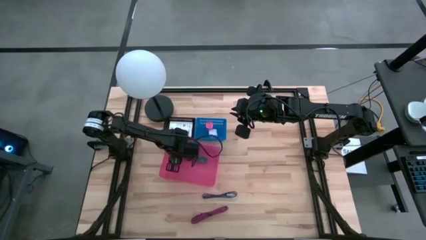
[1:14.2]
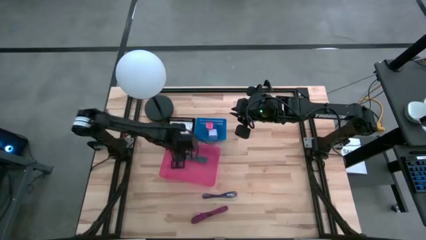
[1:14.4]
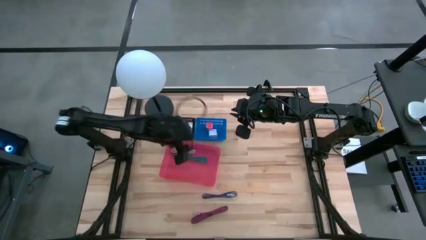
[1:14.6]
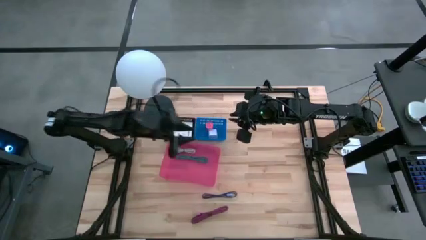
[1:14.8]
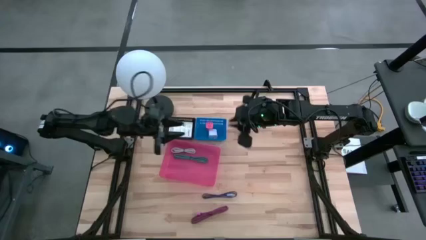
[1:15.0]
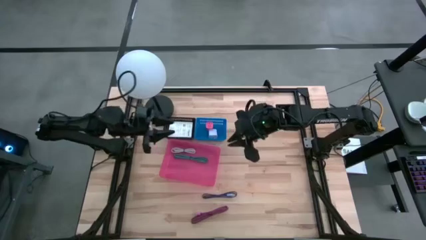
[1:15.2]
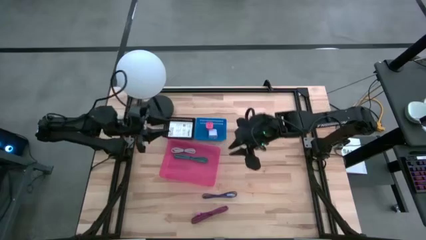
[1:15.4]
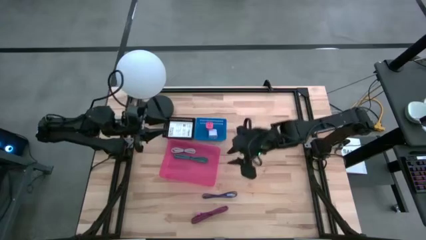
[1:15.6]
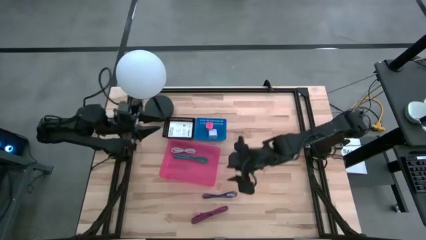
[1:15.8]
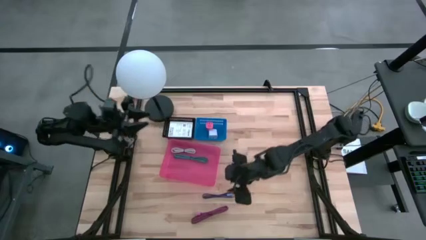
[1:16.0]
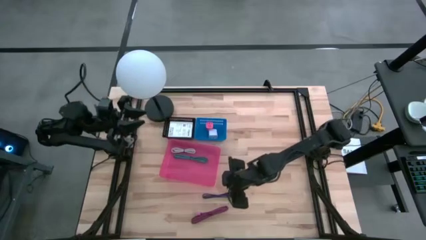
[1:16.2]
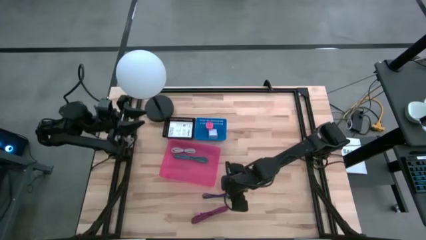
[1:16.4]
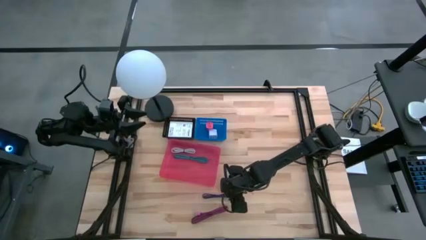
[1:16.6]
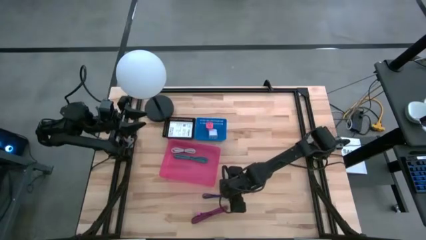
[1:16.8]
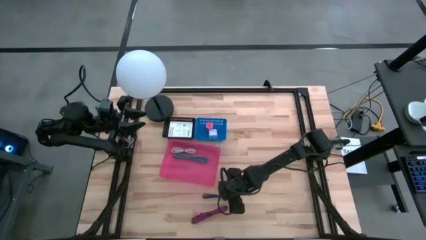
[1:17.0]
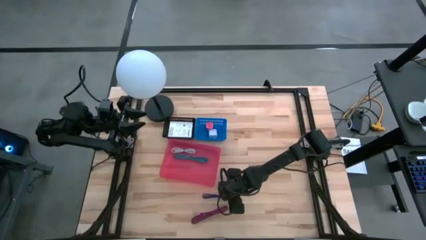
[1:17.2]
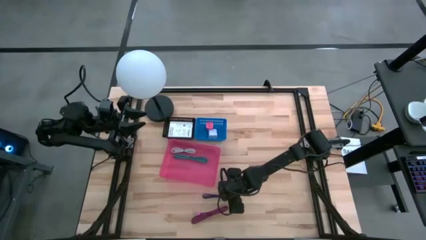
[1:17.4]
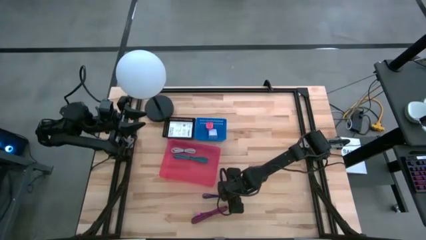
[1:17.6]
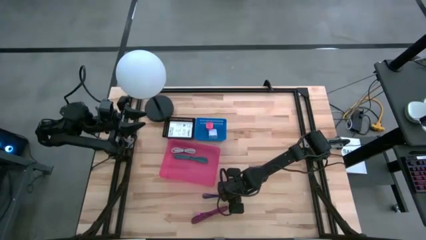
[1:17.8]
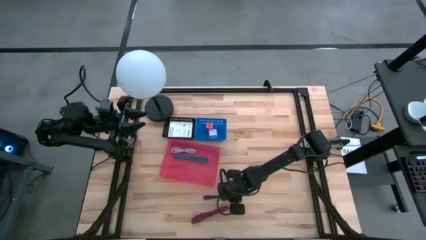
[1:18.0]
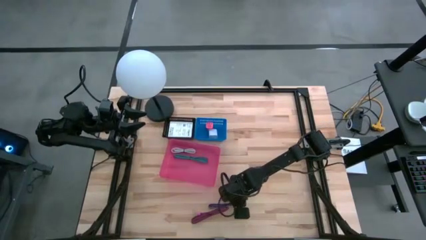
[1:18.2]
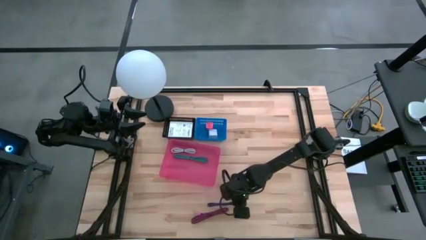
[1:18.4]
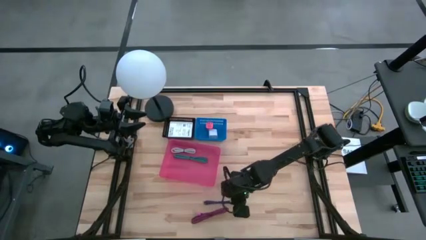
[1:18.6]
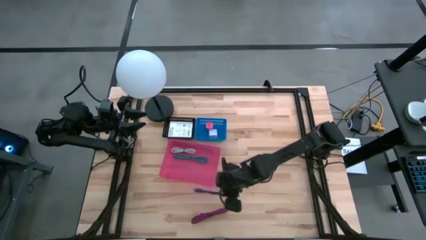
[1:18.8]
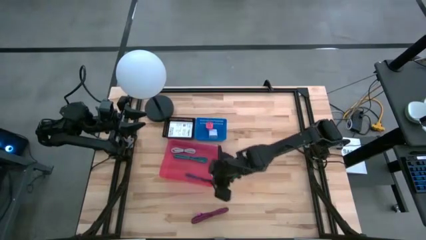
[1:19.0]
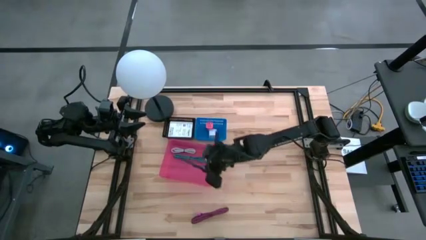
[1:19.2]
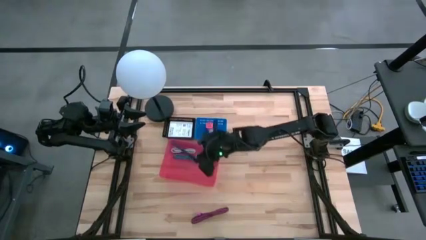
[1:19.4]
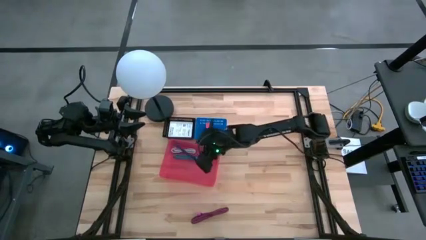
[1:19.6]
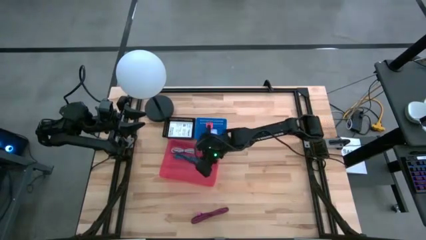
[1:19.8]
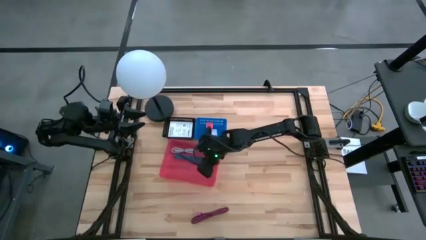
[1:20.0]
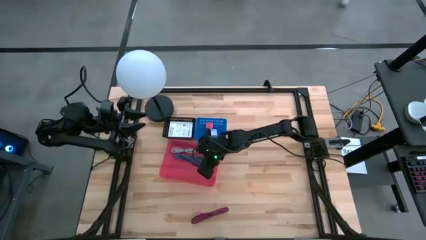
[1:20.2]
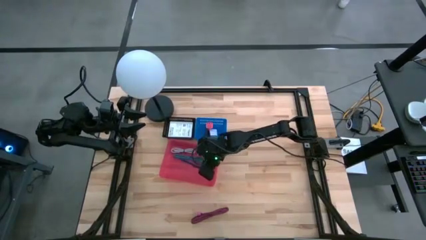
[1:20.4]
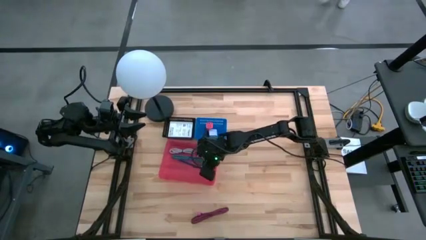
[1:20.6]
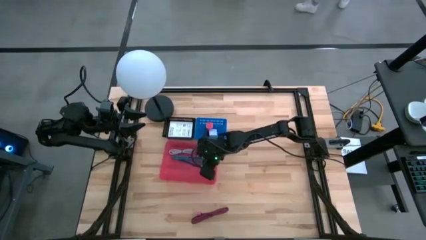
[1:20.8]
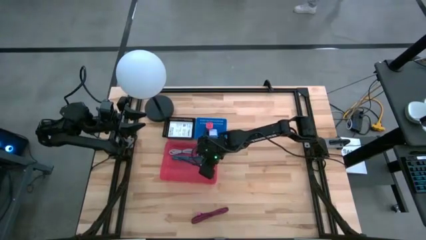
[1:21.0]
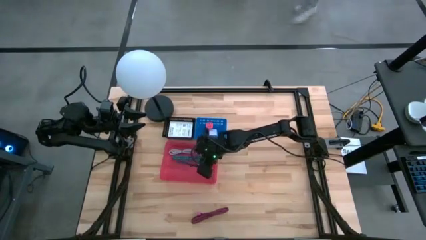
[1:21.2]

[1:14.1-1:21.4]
Task: Pick and place items into bin
Put the black purple charger cable into the pink bin

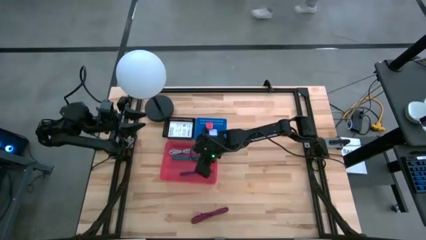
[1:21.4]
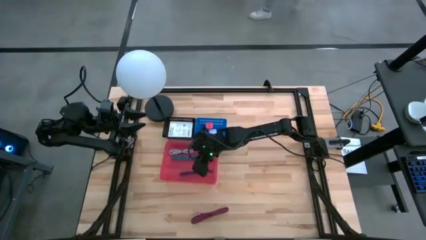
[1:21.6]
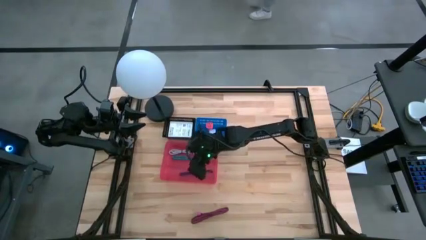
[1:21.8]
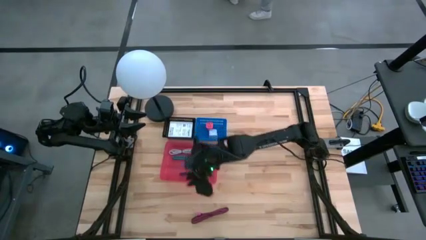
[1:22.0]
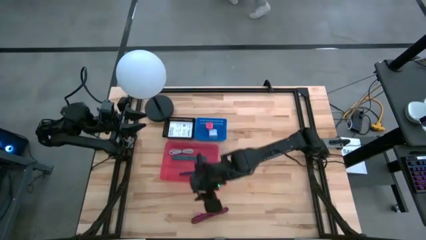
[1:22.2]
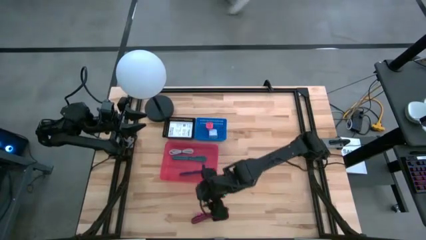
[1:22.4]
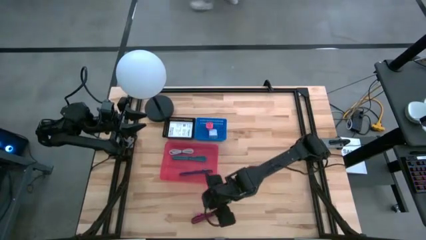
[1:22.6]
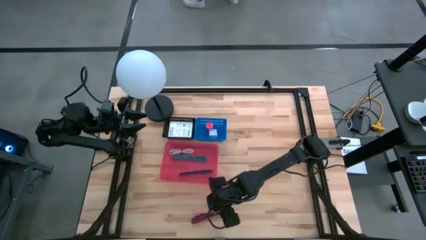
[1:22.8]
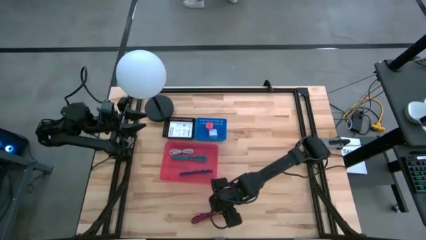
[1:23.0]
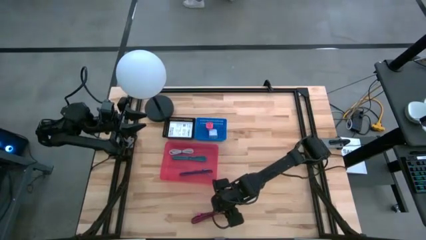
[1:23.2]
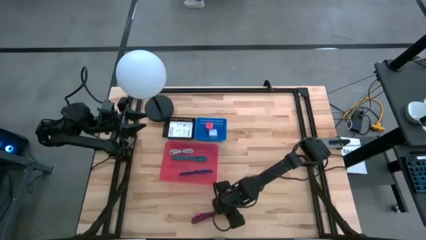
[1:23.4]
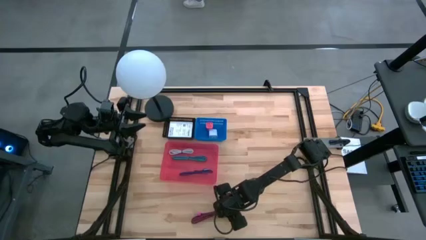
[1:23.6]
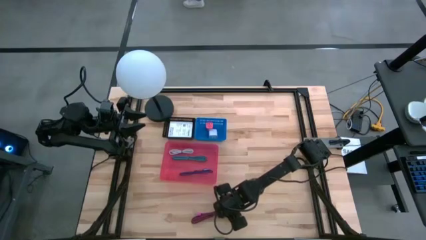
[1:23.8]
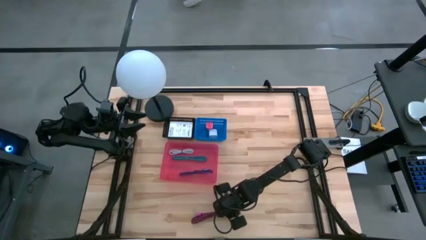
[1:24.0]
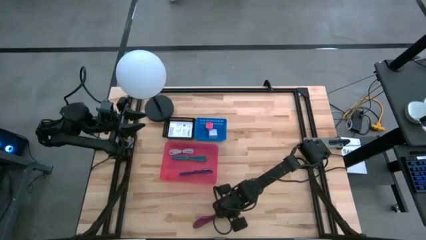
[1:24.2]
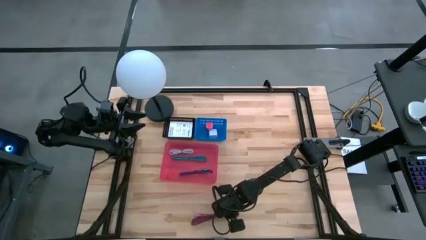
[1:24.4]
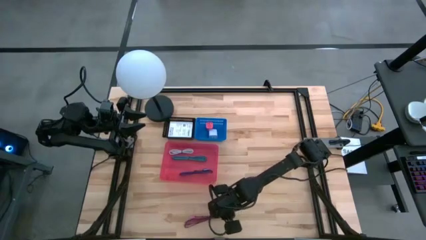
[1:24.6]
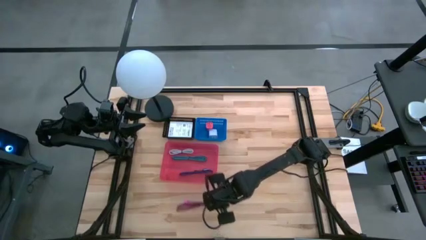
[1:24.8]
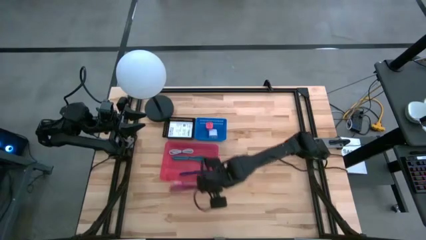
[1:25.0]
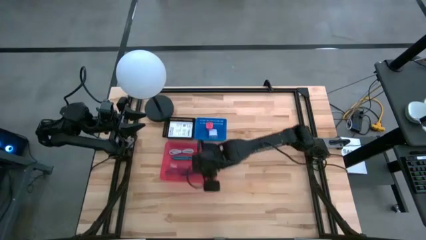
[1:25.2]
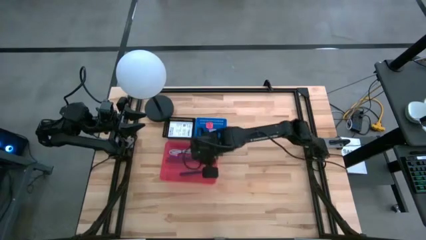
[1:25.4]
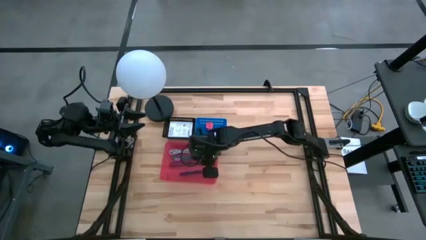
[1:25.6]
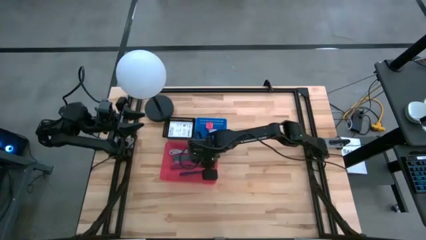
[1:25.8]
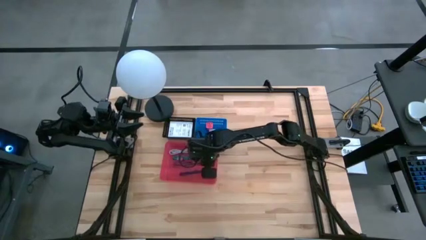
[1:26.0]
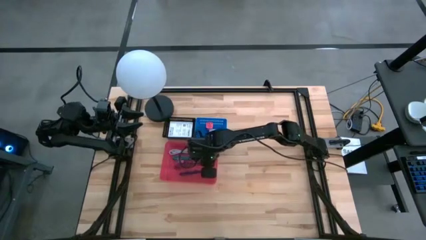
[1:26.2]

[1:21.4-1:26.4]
Put the black red charger cable into the pink bin

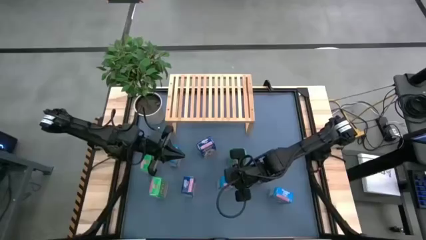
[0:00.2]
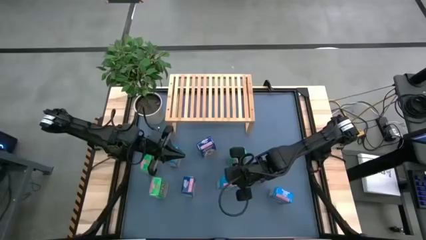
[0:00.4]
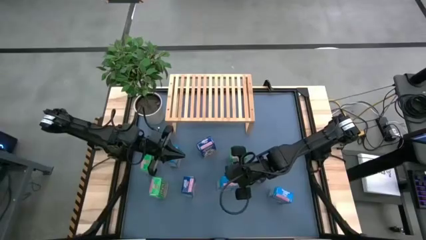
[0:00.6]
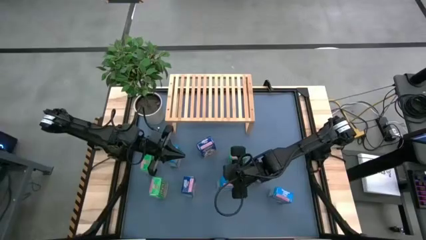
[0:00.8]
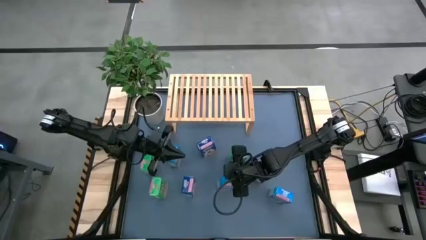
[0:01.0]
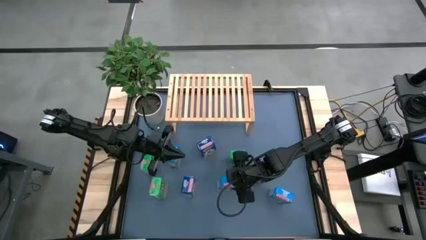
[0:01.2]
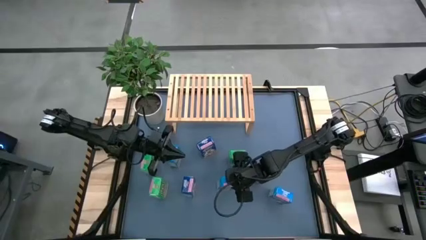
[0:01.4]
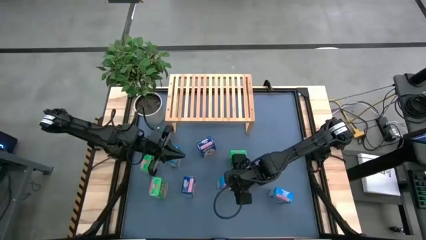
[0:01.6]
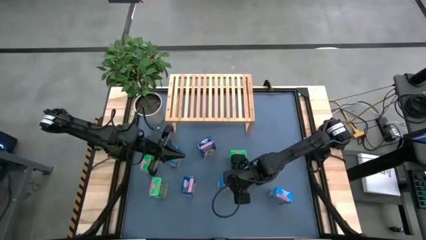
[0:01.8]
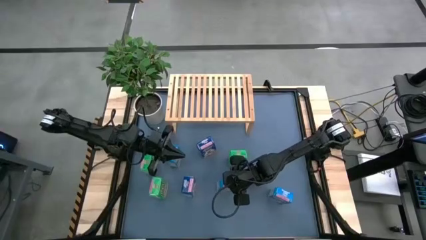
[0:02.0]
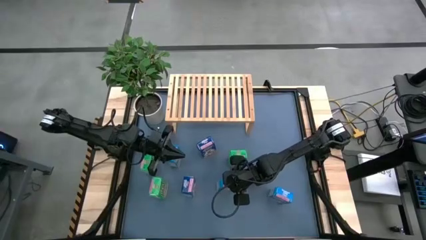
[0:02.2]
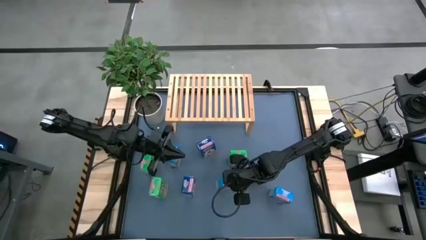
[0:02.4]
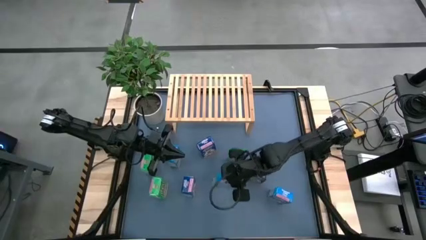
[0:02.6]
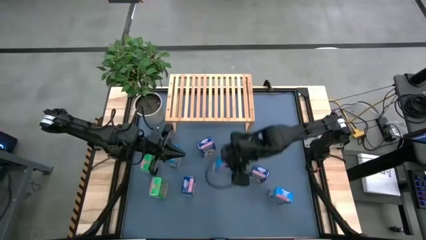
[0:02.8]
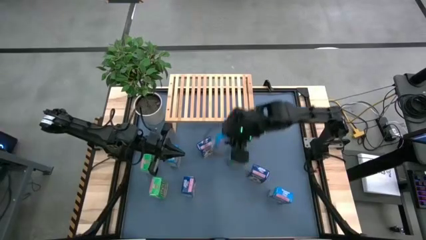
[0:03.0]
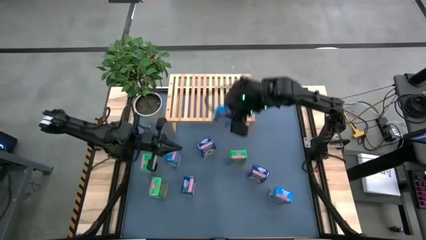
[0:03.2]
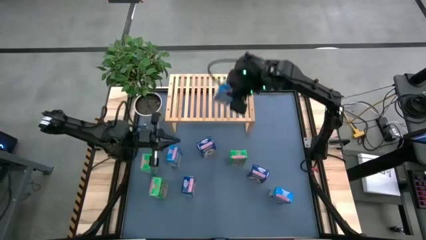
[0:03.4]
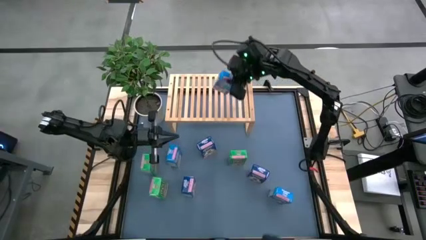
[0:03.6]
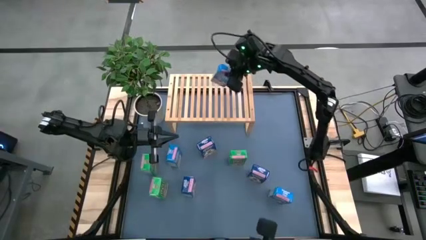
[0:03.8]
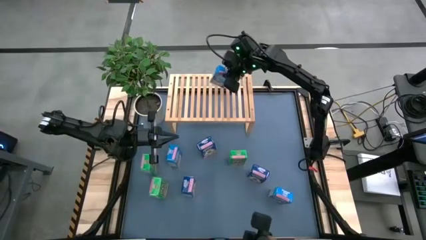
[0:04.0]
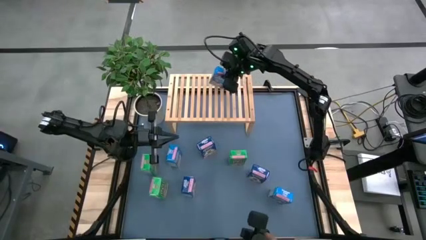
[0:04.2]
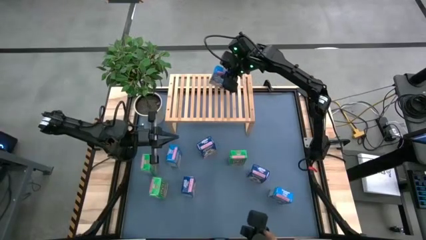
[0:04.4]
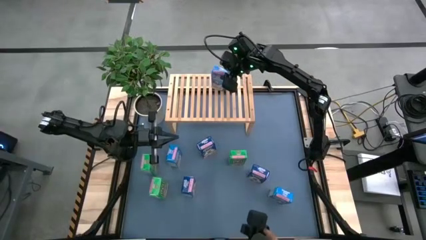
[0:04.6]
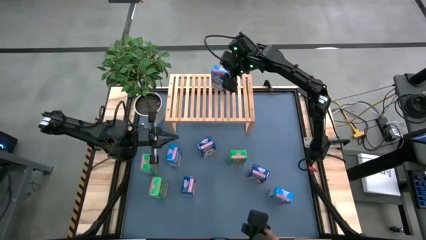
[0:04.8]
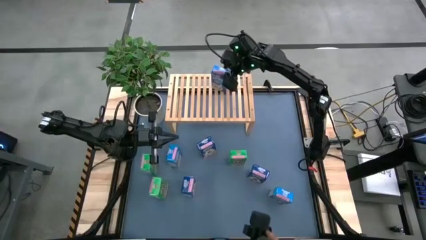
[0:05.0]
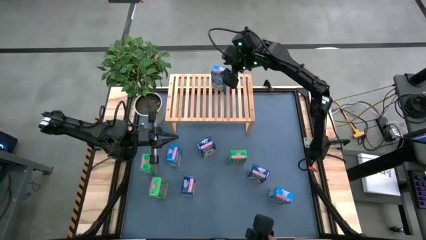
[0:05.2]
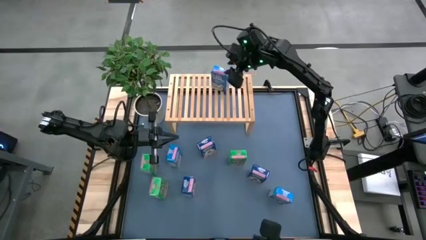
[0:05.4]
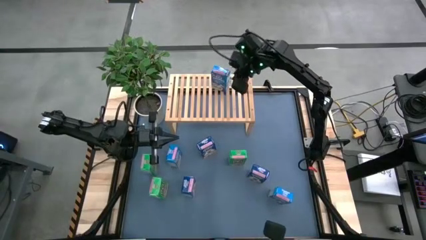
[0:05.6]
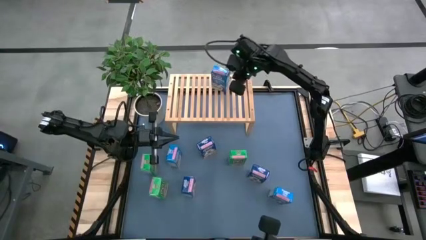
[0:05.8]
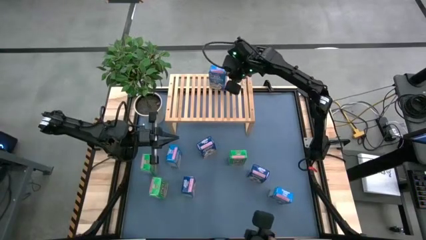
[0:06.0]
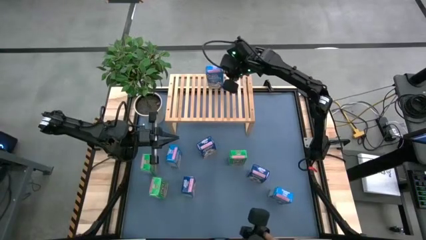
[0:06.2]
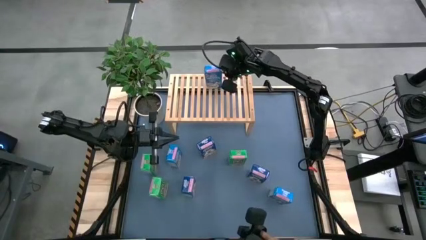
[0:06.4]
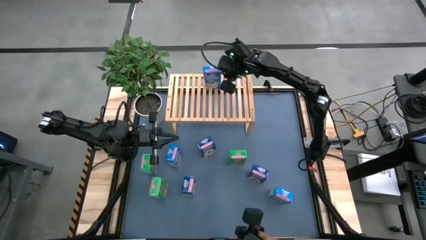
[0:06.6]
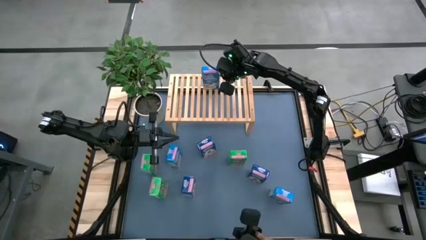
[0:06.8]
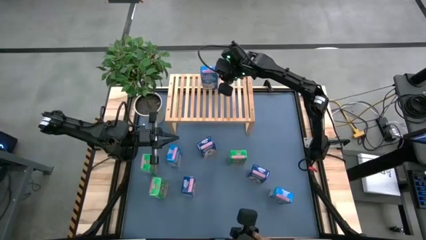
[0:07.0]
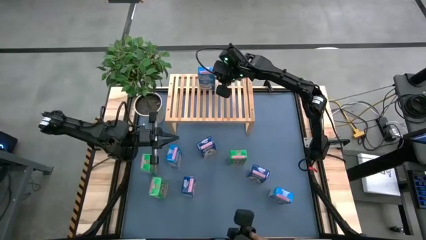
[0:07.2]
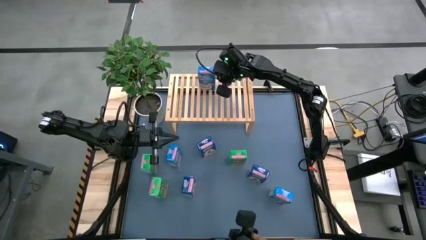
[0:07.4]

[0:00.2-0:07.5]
Task: Stack cereal on shelf
Put the middle light blue cereal box on the shelf
